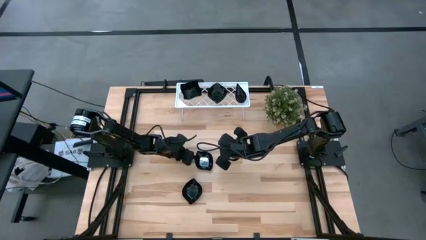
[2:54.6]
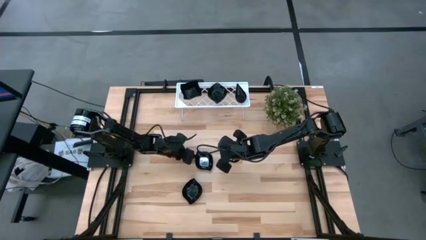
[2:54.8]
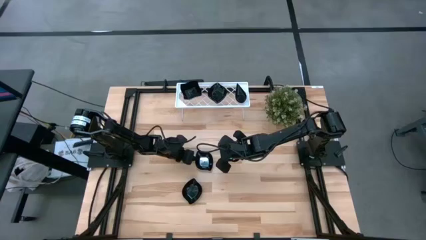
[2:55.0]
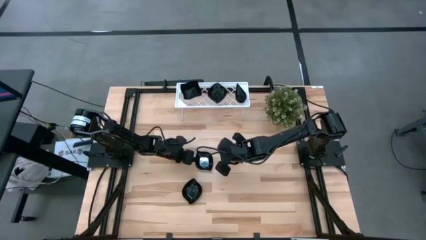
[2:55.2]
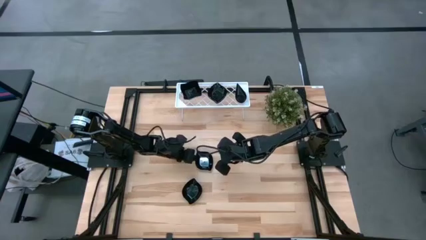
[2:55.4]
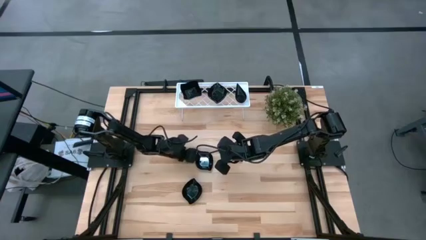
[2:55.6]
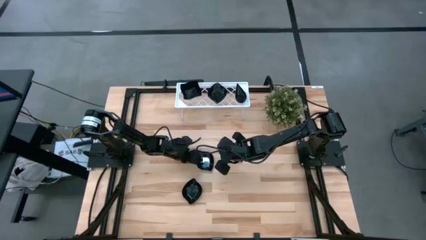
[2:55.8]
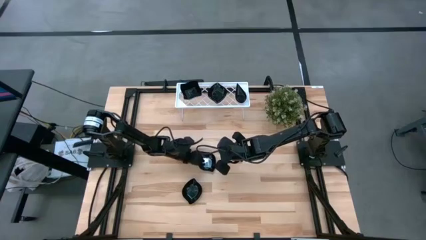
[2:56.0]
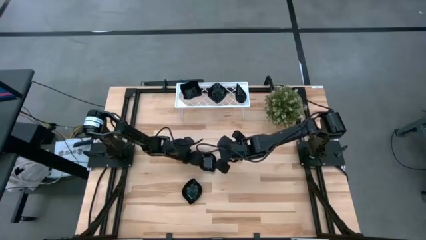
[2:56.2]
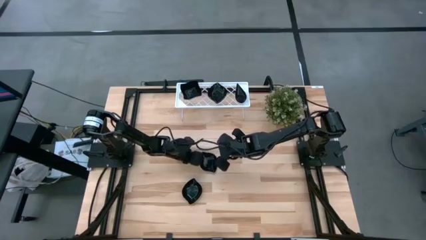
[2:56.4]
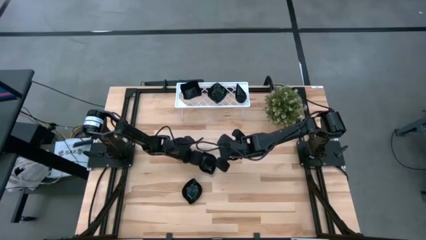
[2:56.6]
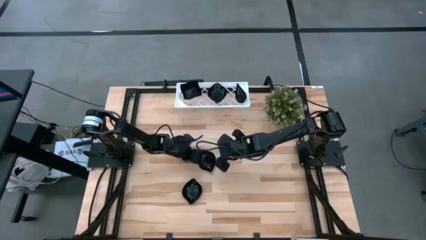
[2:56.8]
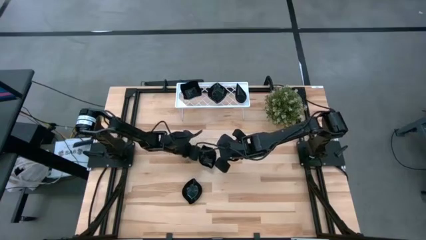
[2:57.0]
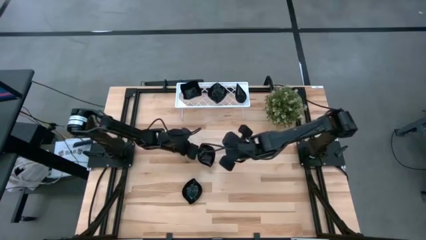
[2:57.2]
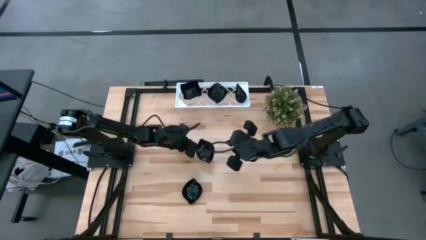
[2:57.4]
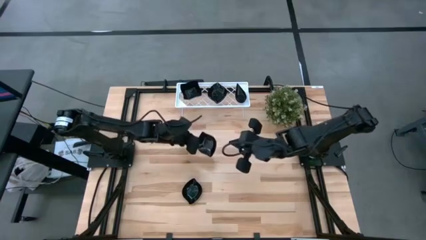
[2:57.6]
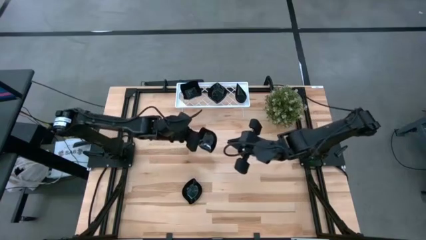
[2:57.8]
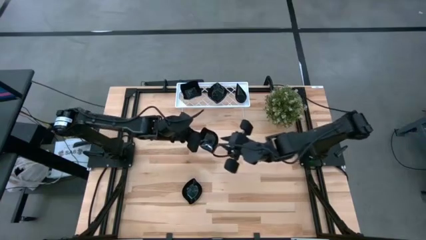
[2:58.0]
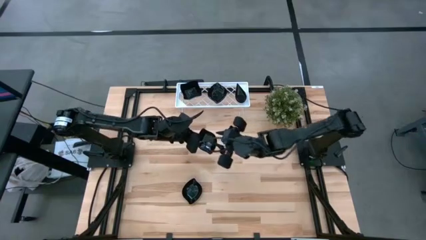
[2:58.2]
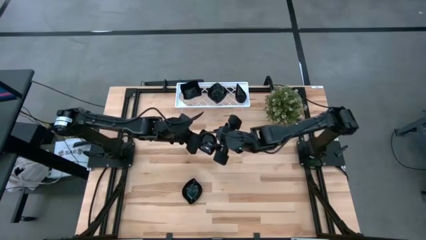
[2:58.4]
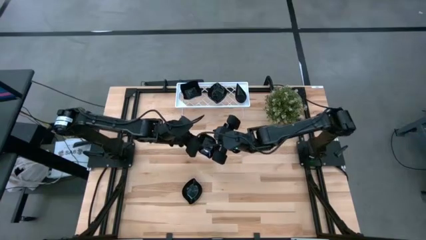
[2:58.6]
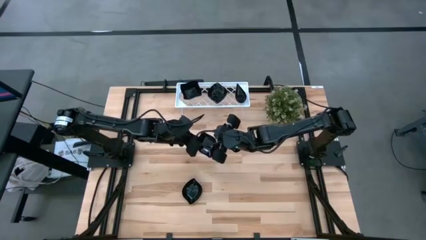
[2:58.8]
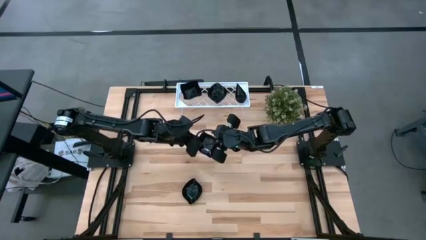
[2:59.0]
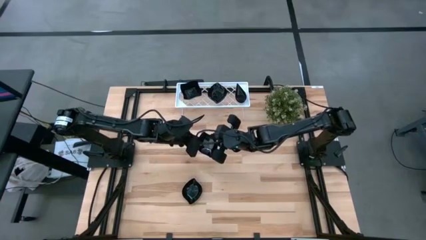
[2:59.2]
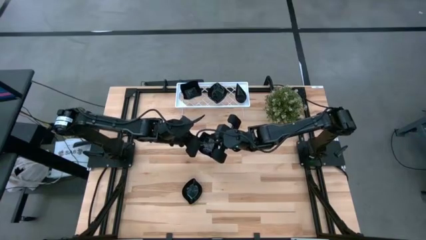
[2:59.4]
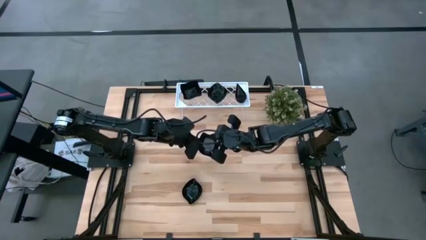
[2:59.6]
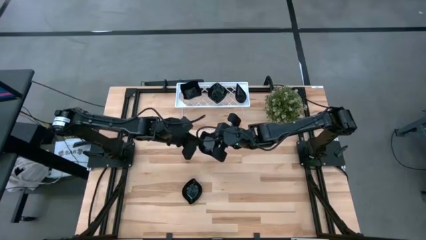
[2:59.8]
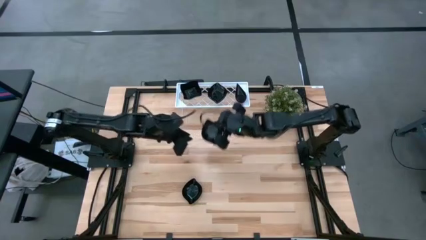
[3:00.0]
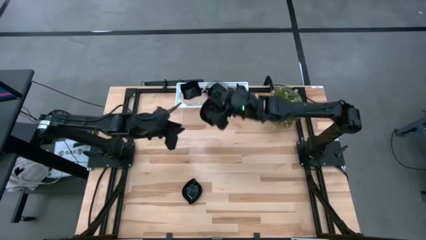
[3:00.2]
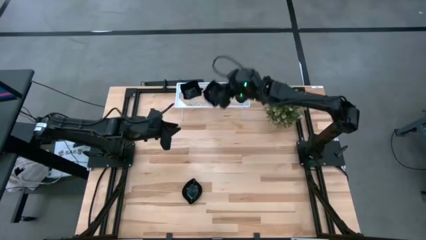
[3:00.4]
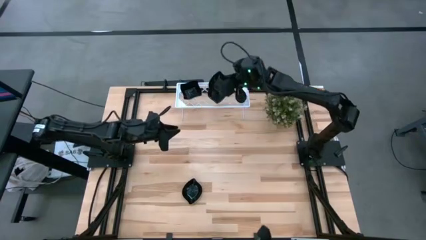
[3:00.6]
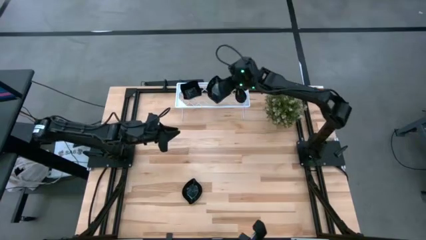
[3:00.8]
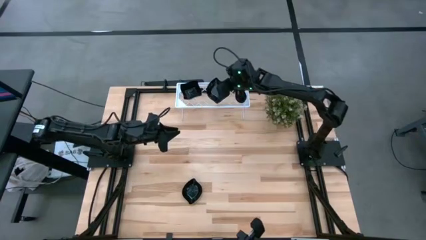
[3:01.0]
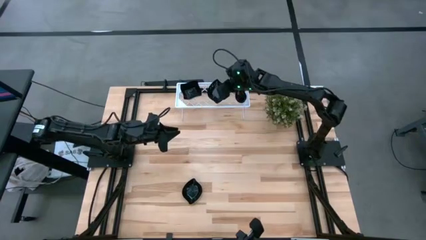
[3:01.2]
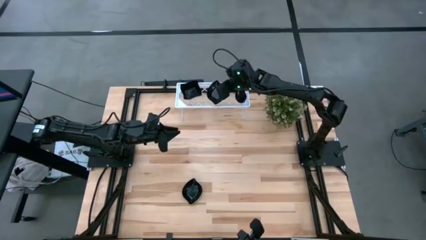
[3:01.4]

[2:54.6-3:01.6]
Task: Pick & Place Mini shaped plates
Stack the leaf-shaped plate on top of the leaf-shaped plate on the shelf
